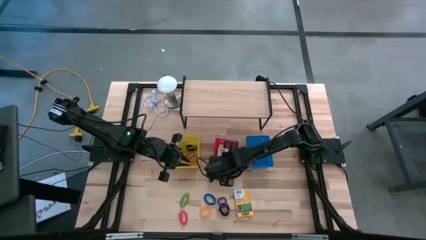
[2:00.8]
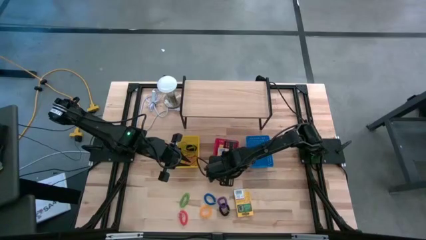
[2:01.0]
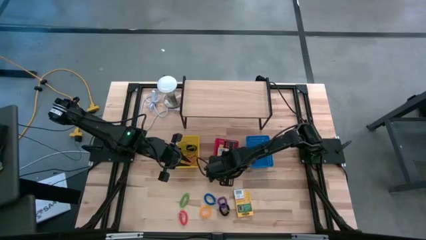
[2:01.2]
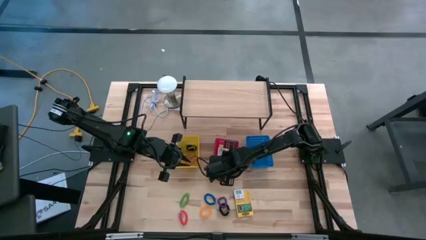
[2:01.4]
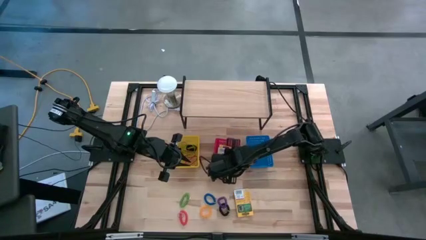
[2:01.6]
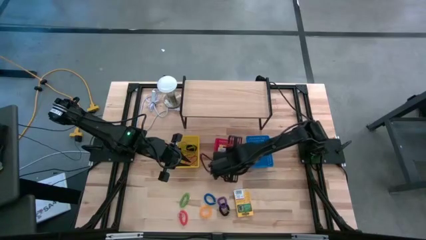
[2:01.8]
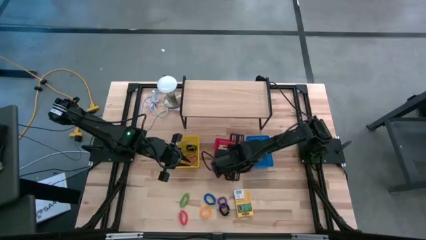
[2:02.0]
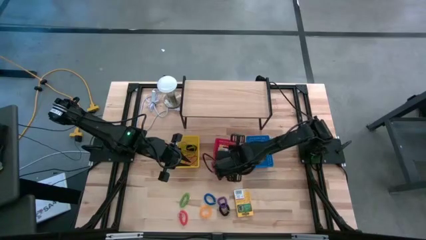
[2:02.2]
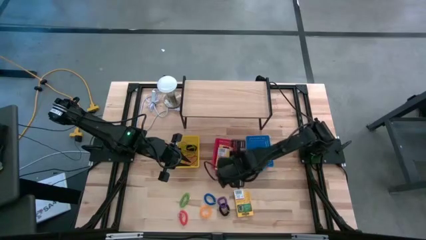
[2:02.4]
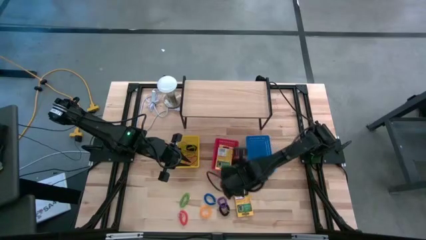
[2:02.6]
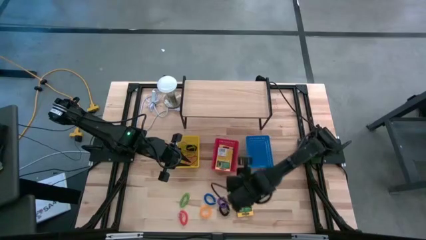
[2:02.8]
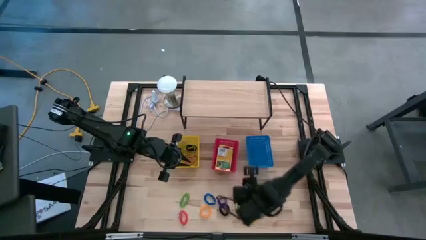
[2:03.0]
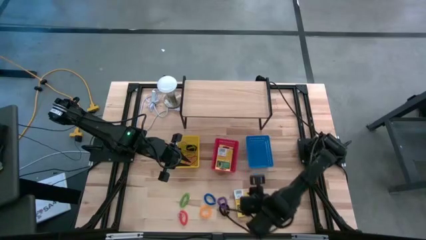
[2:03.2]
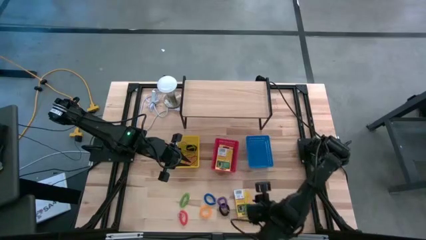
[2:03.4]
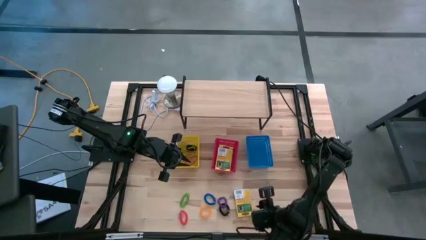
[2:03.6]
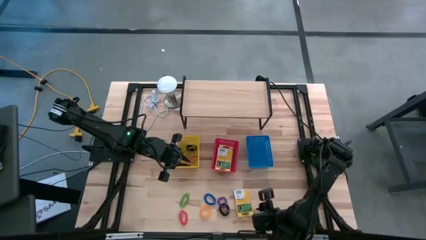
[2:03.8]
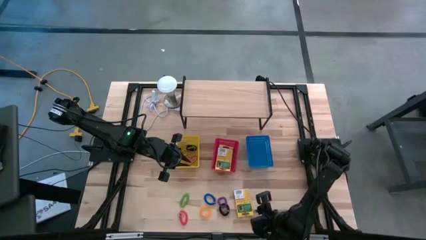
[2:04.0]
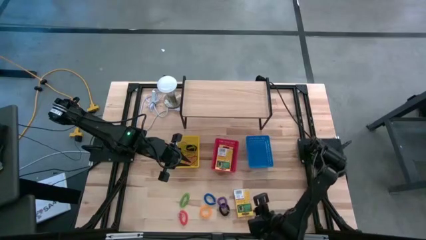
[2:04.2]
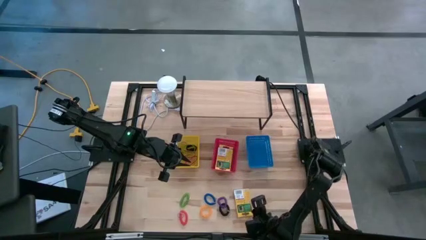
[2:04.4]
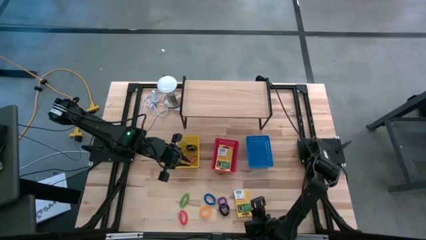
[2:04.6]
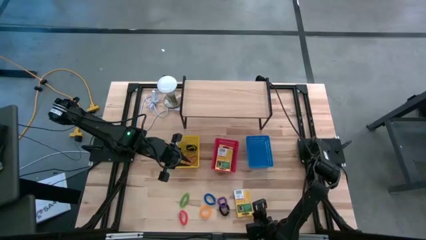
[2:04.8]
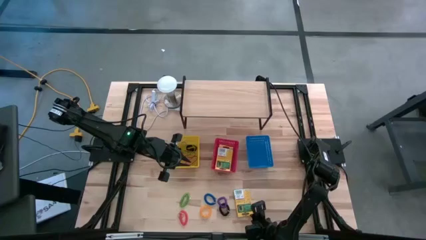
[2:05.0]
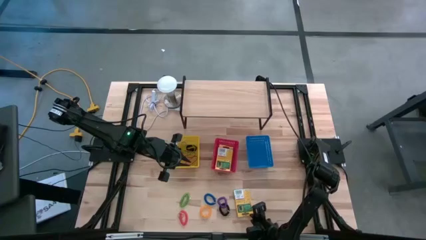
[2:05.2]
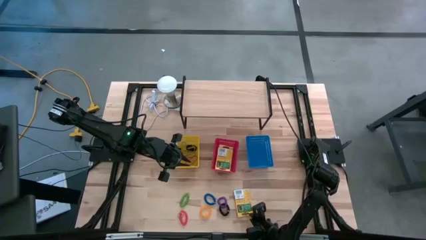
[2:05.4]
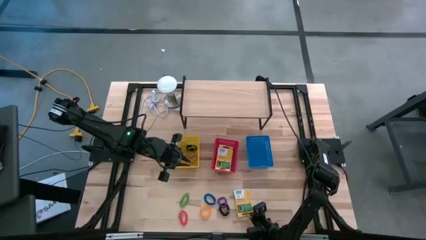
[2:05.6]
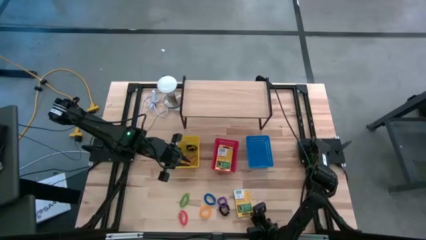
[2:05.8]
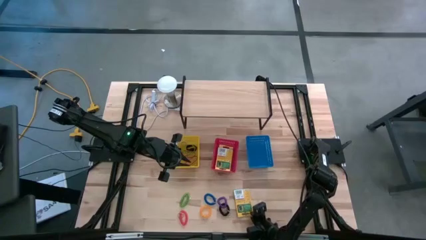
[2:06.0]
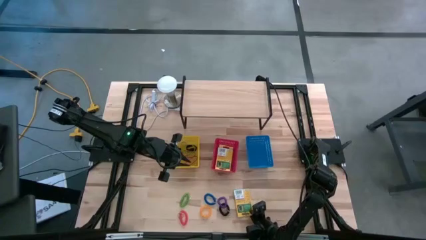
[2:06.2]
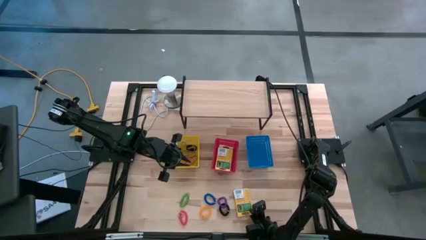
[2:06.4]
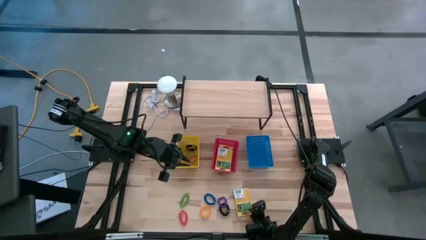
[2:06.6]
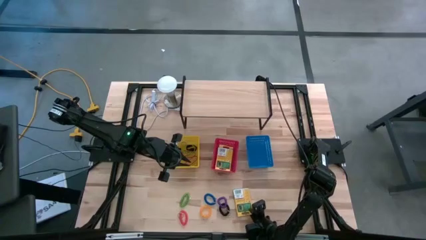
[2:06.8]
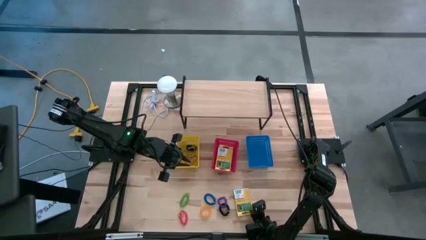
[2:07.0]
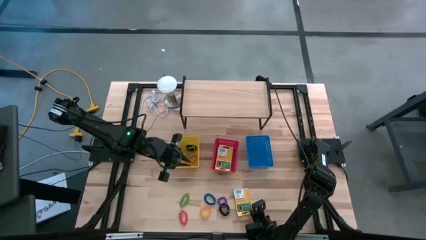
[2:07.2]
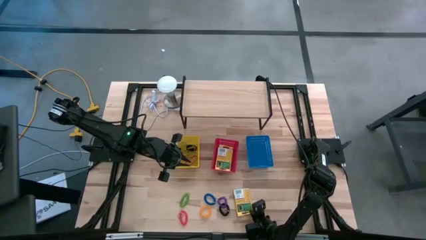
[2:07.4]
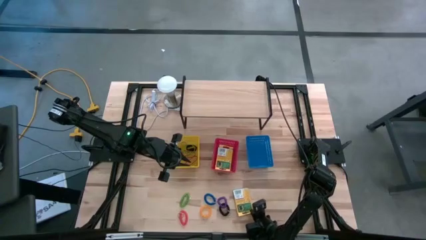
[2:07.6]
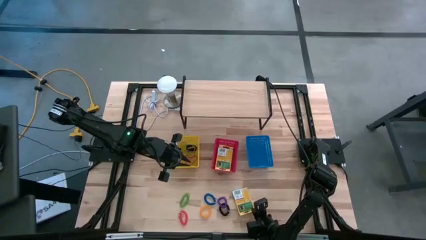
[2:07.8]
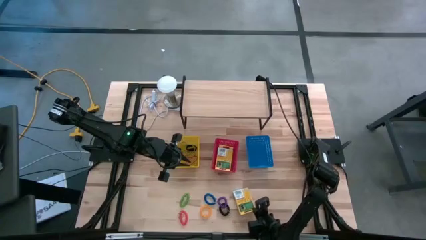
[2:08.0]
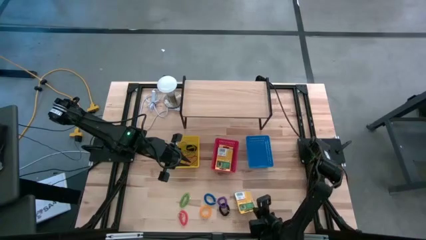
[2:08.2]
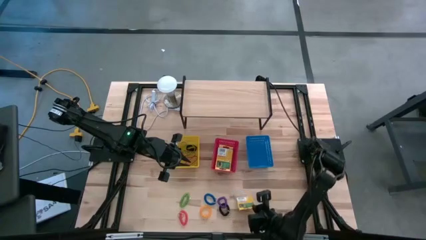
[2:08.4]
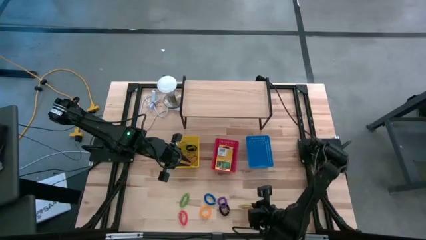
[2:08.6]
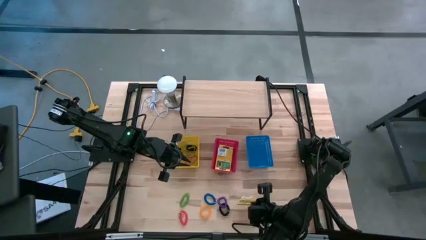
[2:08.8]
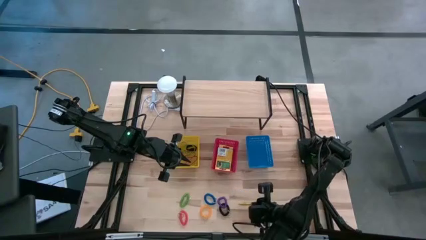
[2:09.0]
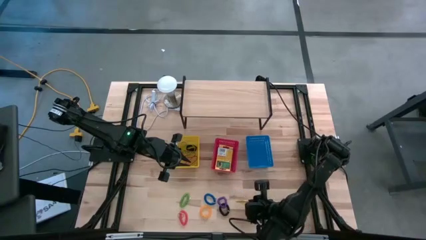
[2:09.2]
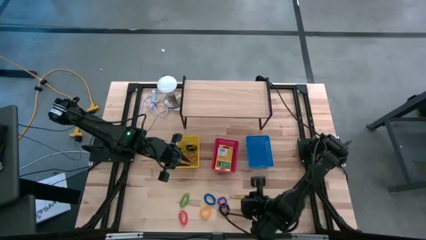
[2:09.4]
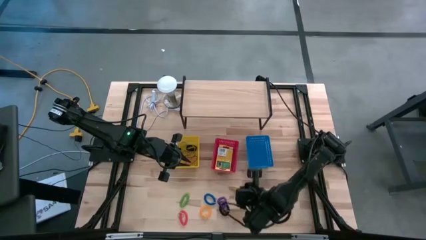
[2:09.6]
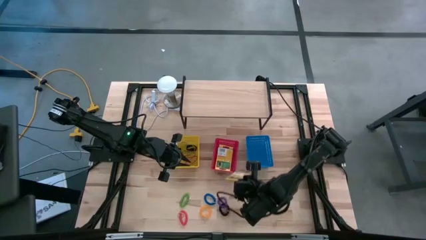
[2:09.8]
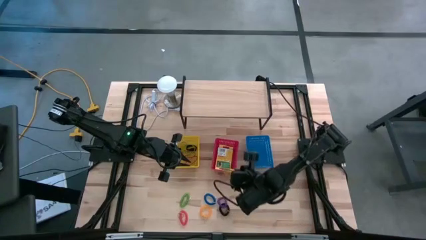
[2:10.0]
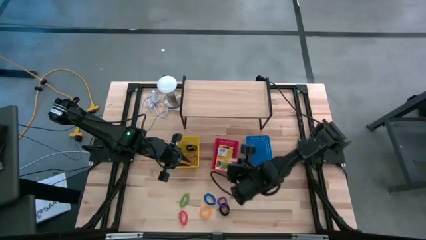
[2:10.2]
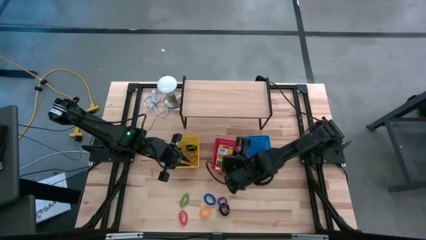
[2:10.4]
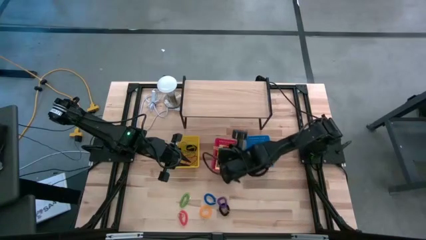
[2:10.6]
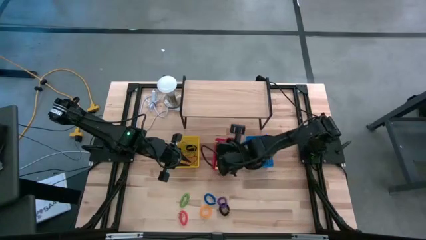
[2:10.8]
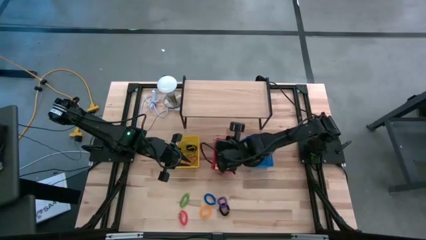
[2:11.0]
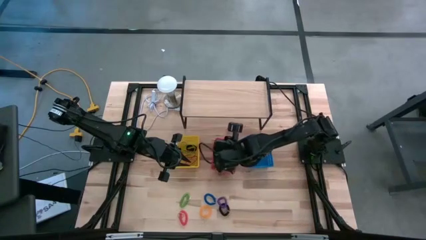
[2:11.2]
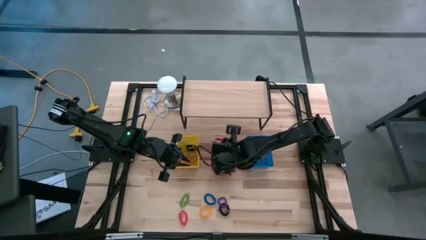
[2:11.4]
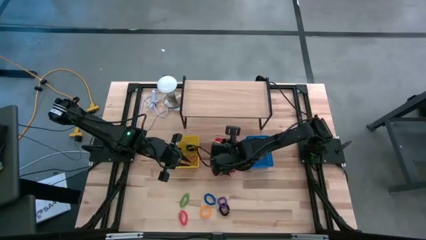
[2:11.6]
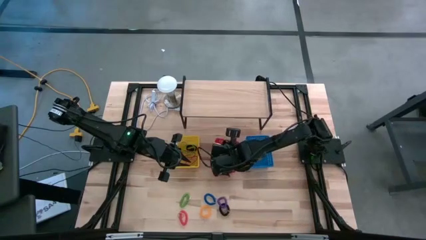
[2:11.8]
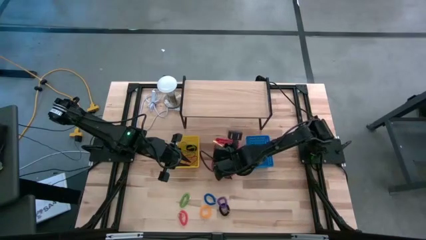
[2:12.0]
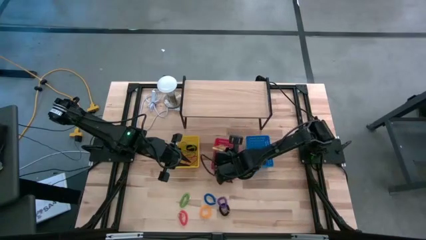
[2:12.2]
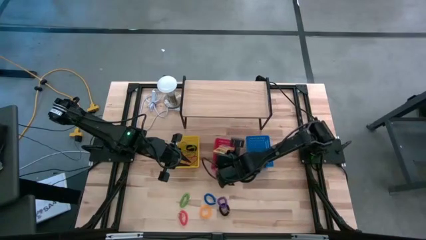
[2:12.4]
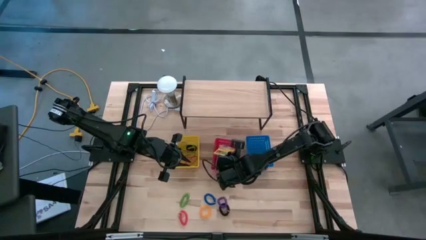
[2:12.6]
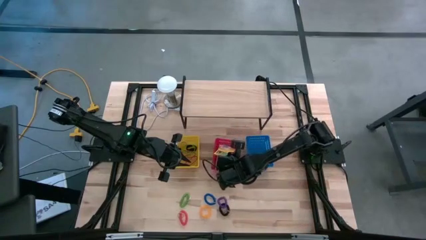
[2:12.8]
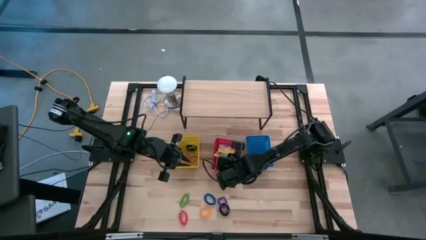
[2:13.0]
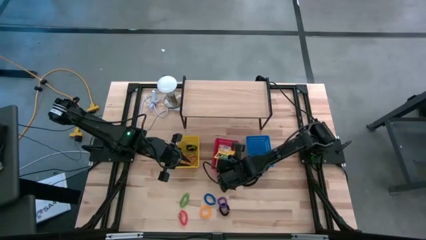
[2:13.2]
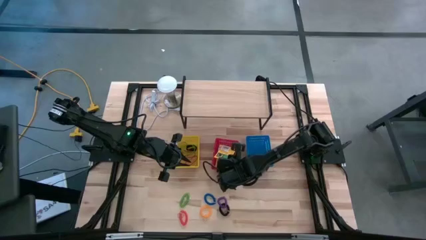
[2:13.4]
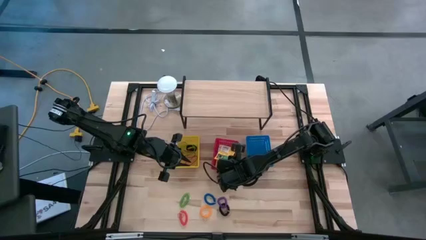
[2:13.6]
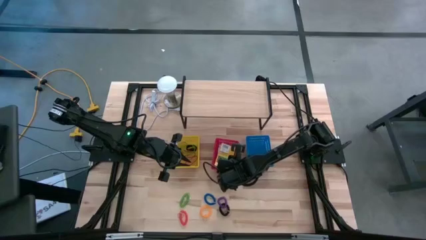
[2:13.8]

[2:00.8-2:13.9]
Task: Pick & Place Office Desk Supplies
Stack the yellow crayola box on top of the yellow crayola box in the red bin
